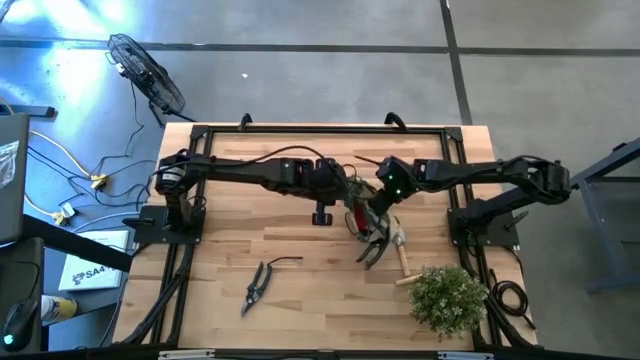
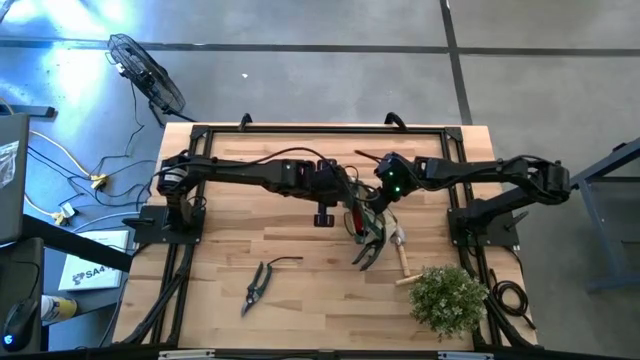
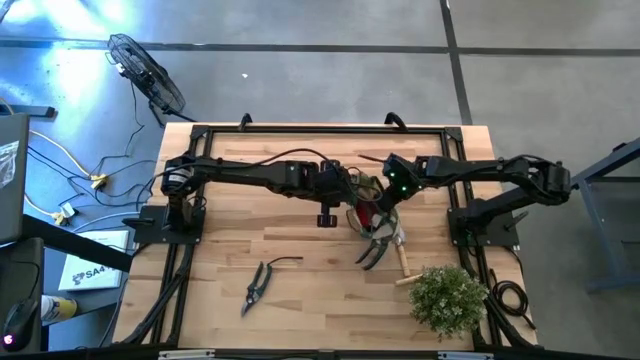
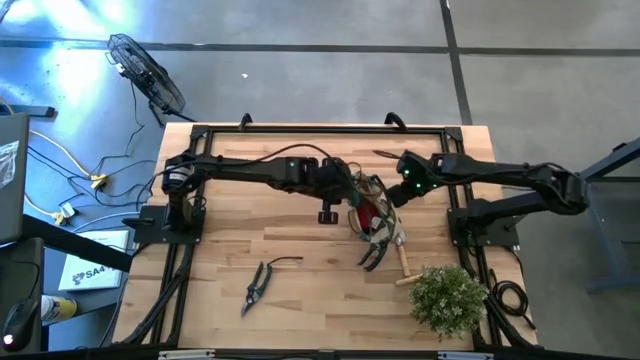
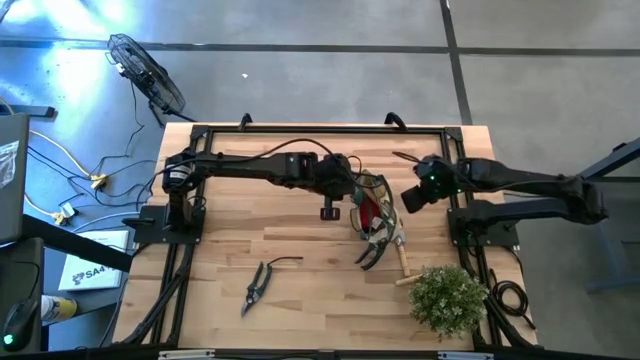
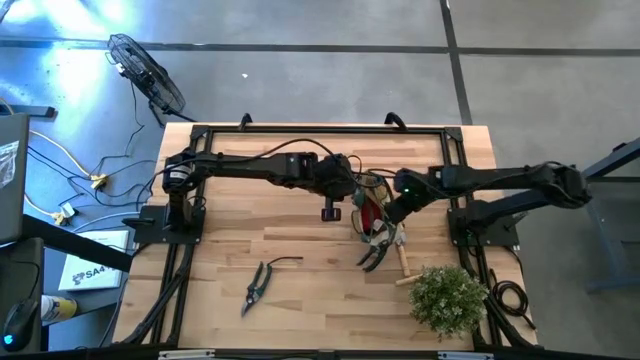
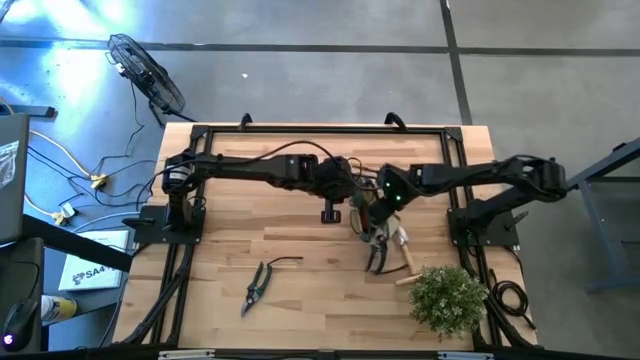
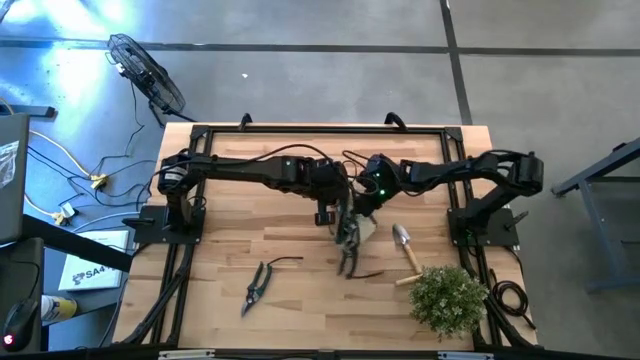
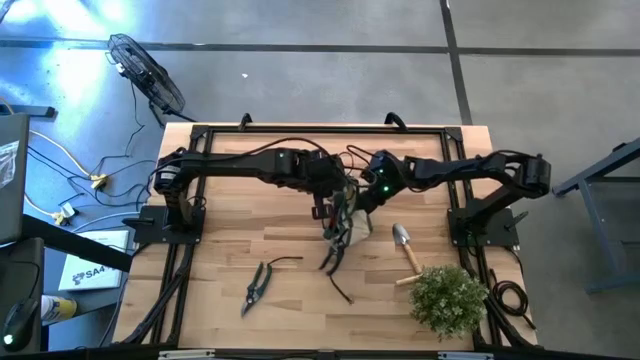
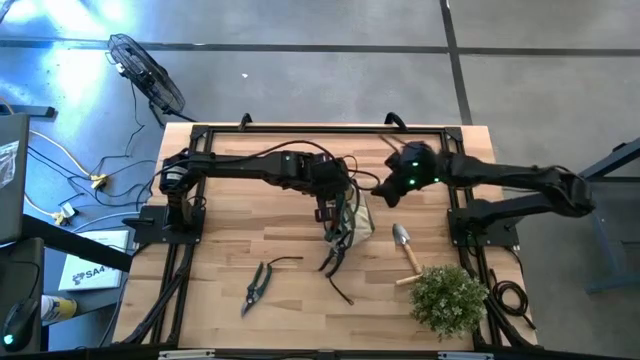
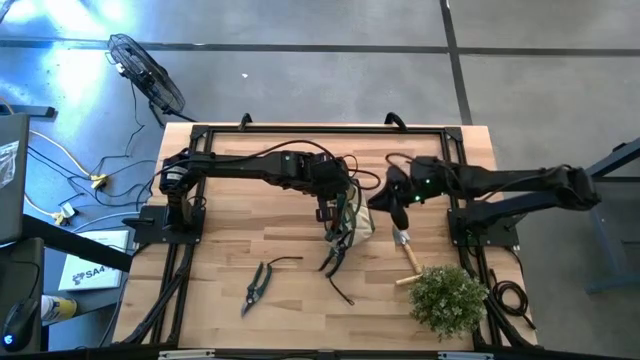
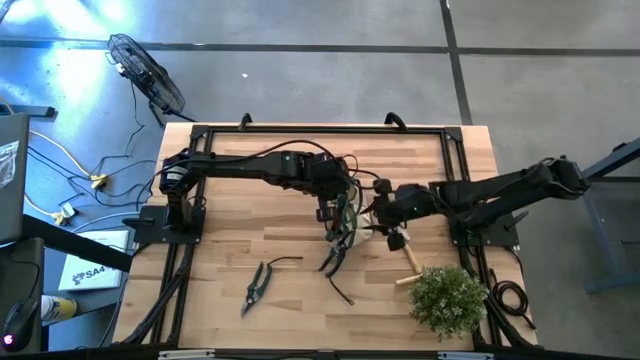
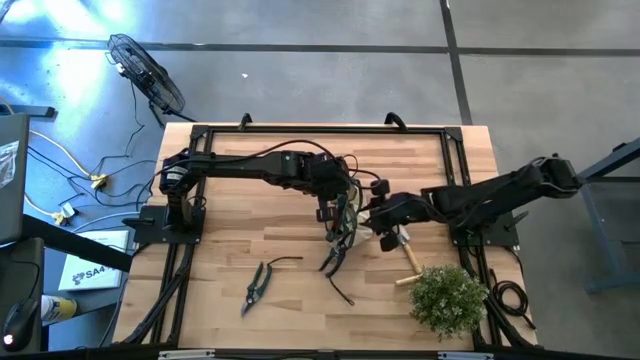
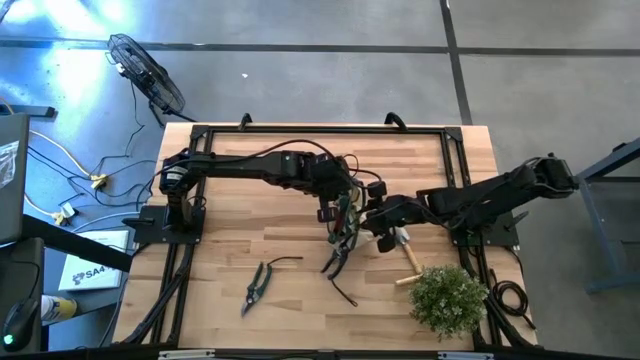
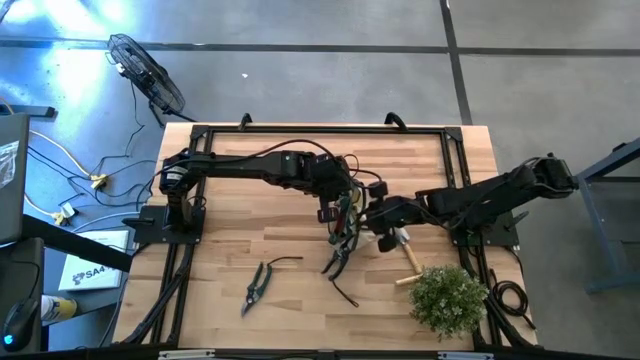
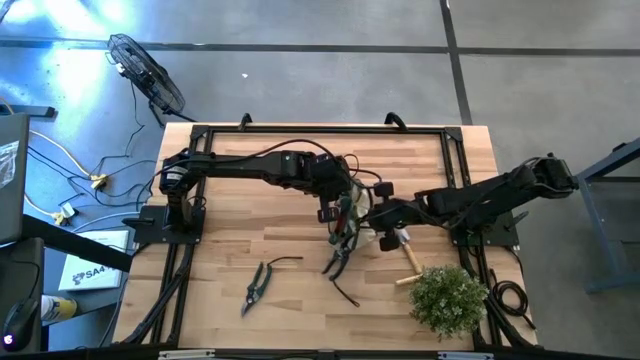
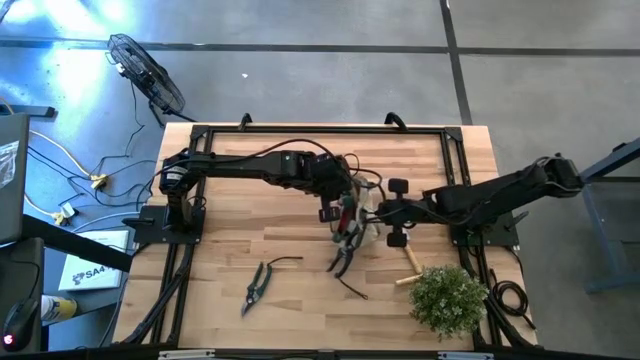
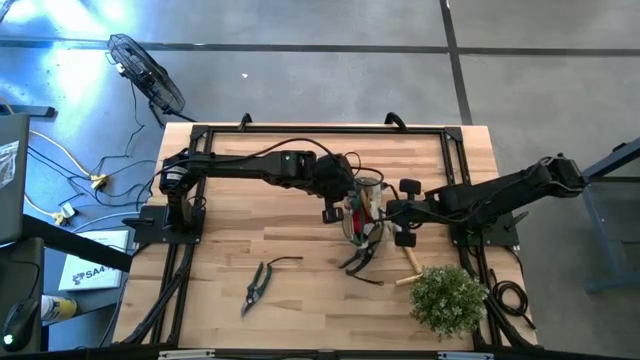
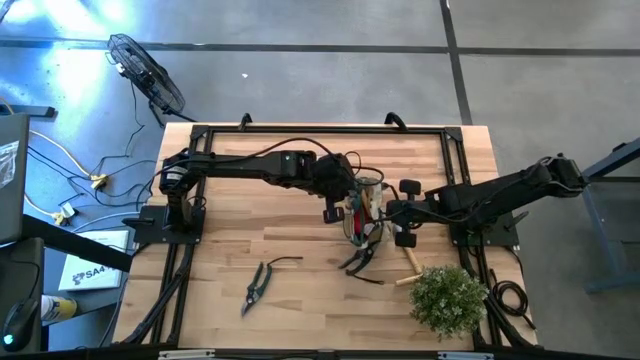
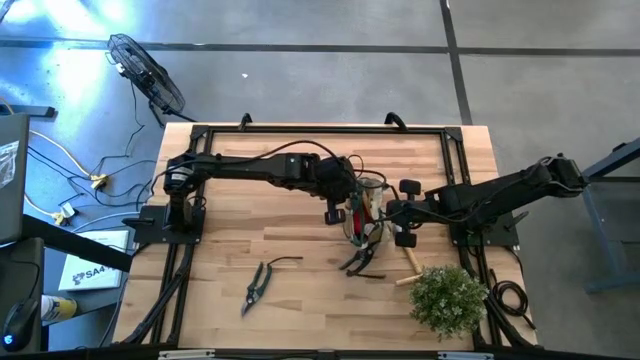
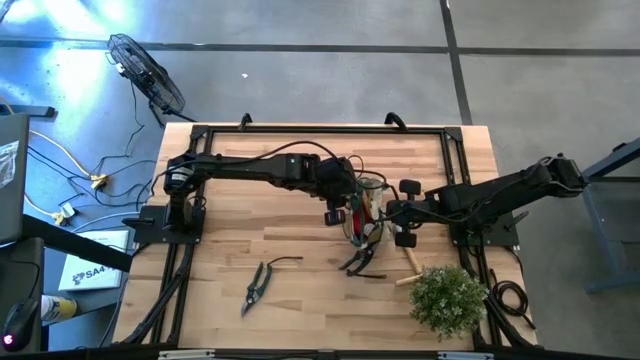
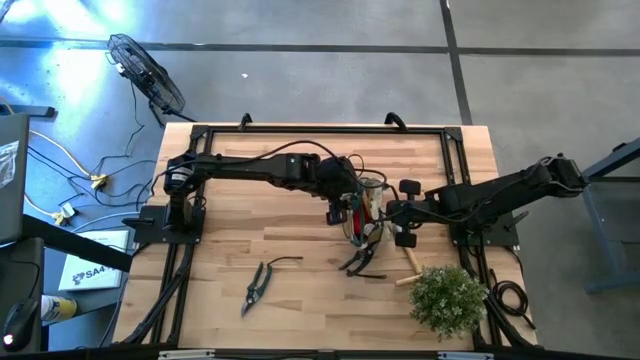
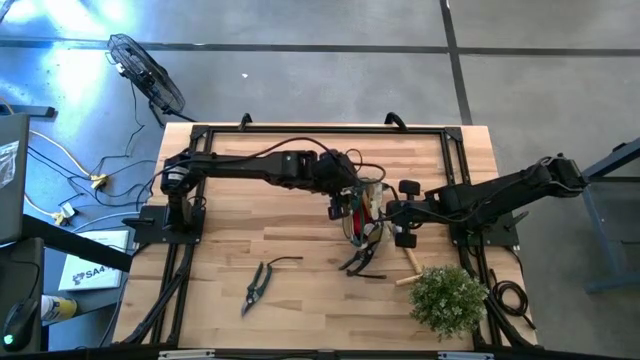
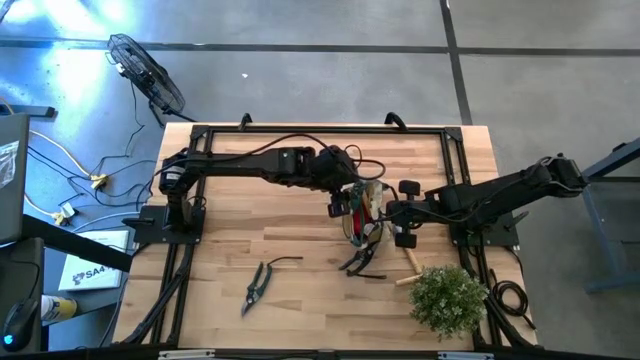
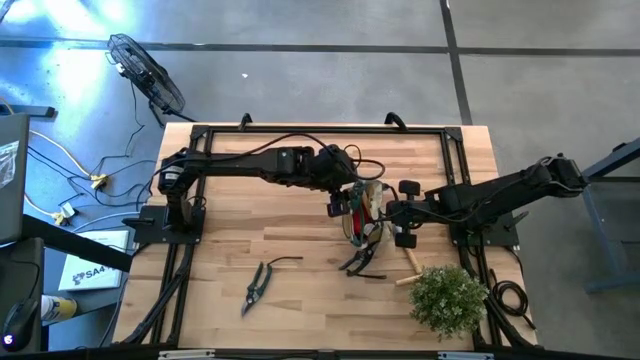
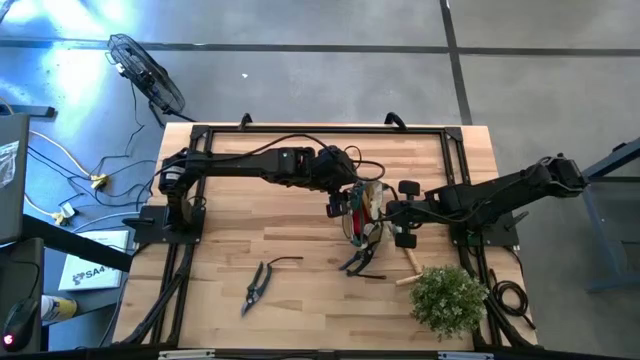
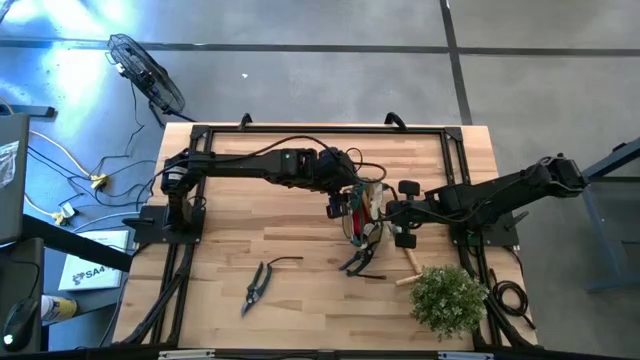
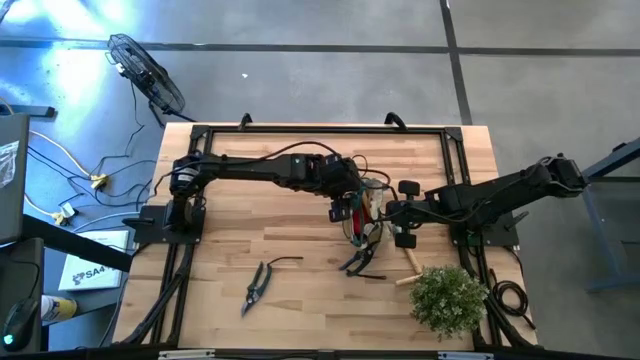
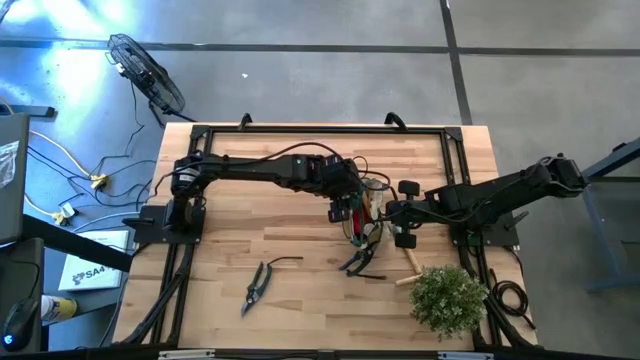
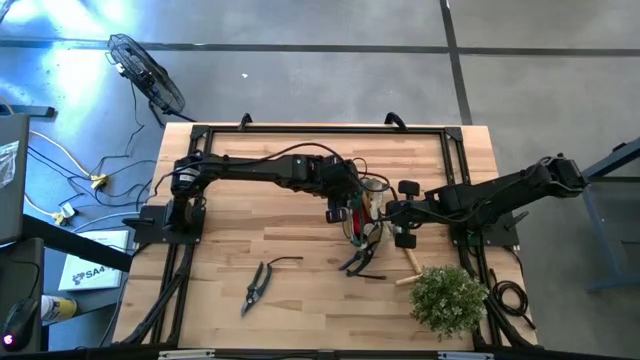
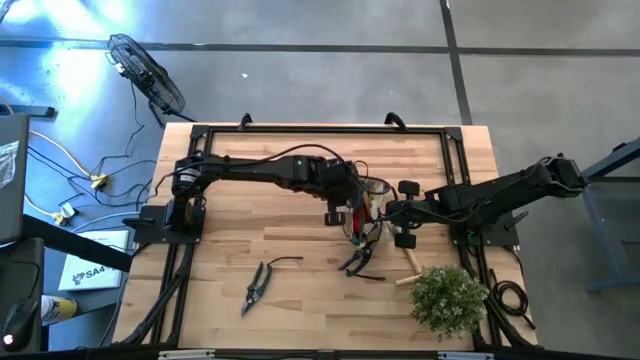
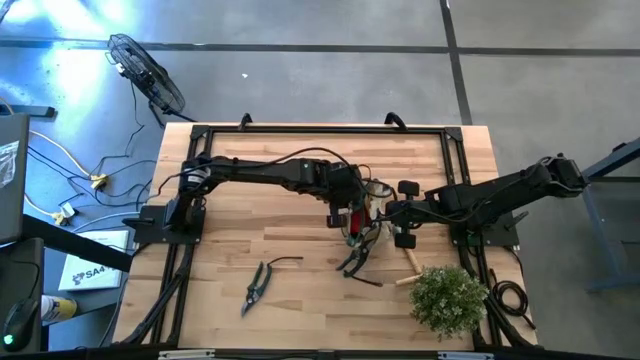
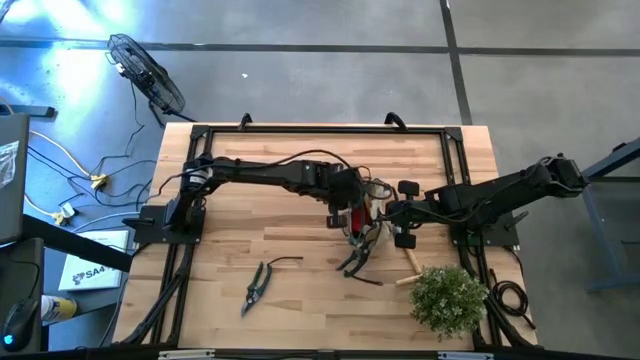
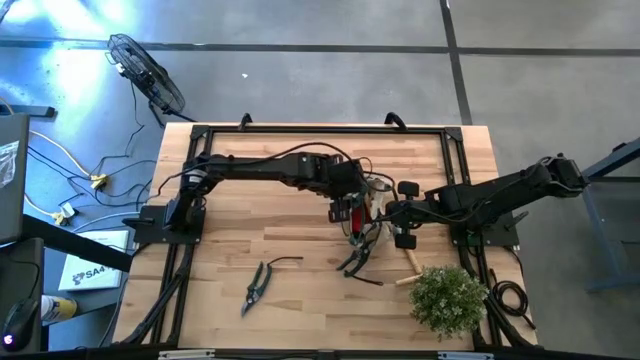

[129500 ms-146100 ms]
Task: Pick & Place Garden tools in Gardening bag
Put the bottom left brown trowel into the light brown gardening bag

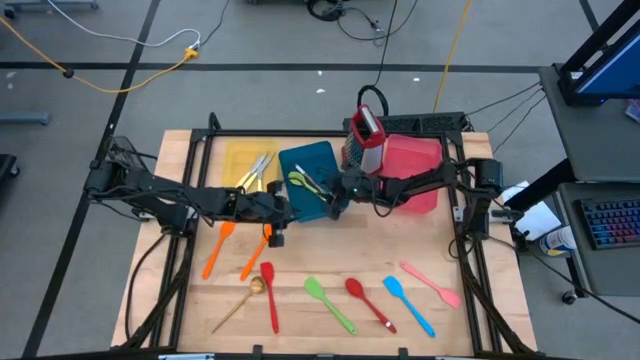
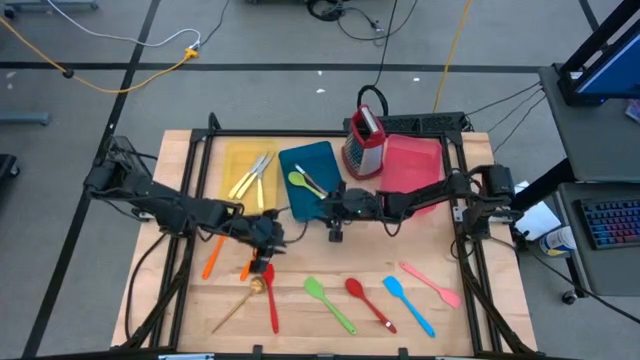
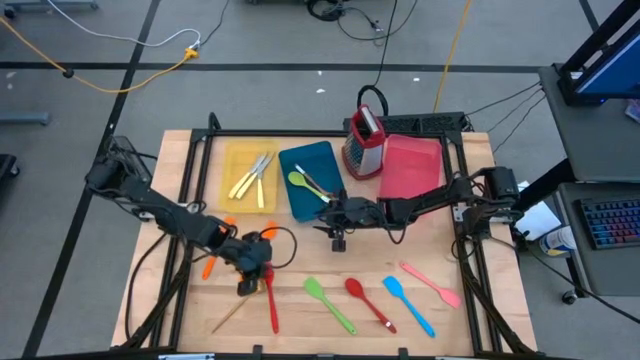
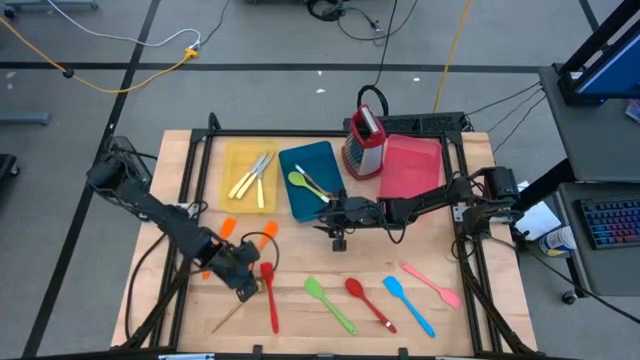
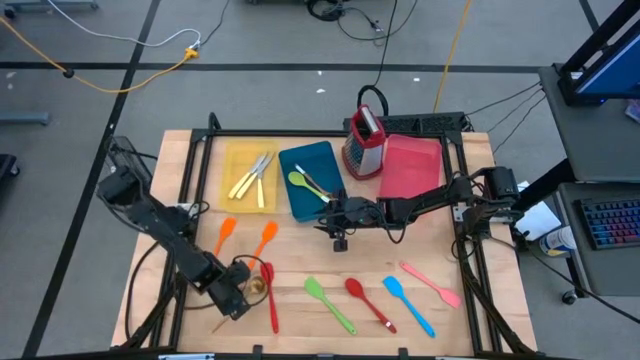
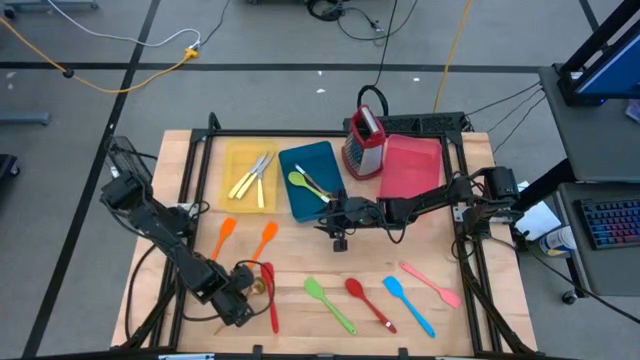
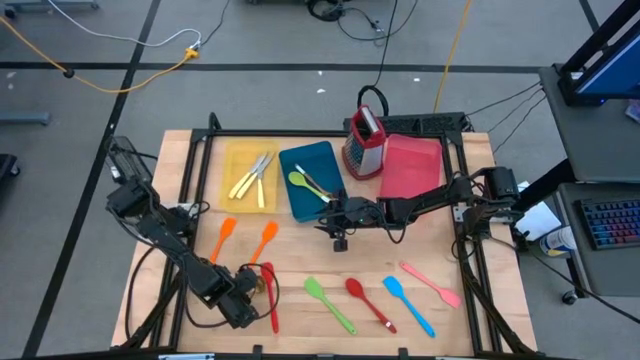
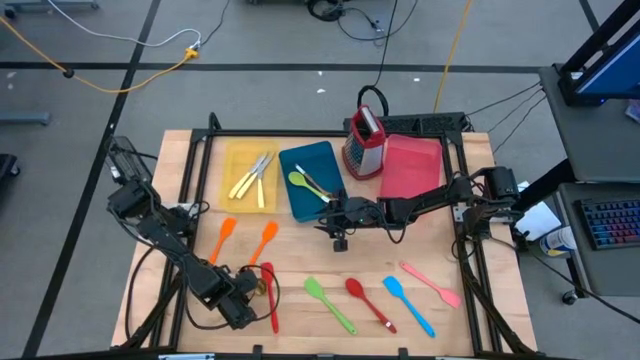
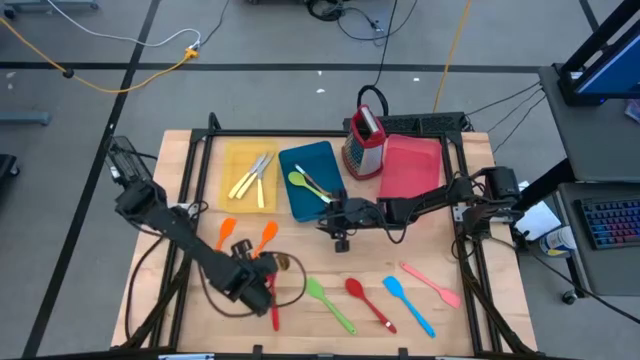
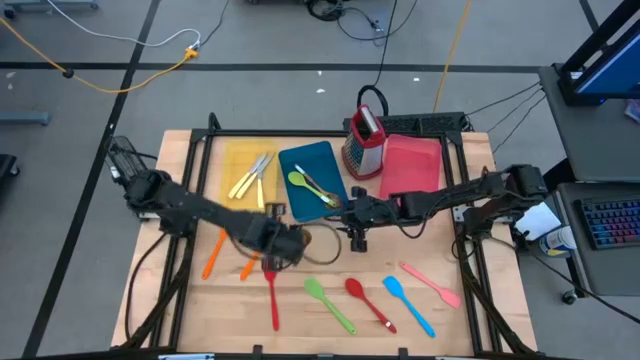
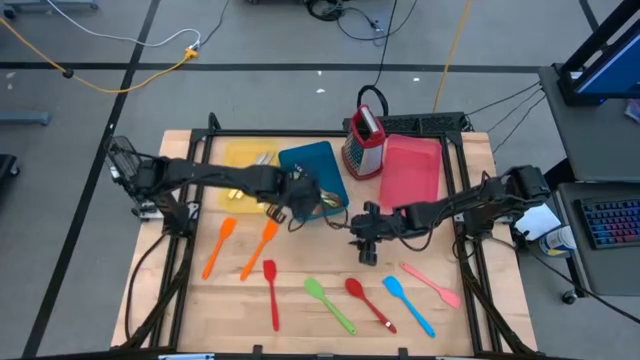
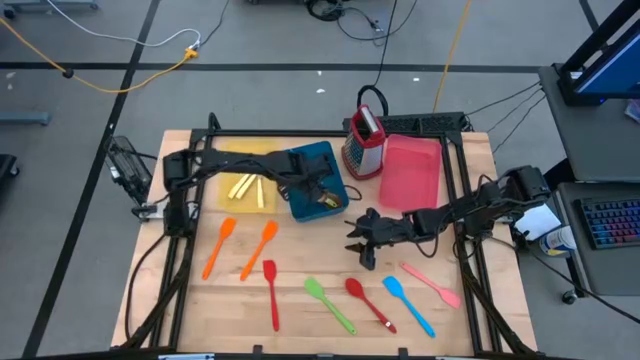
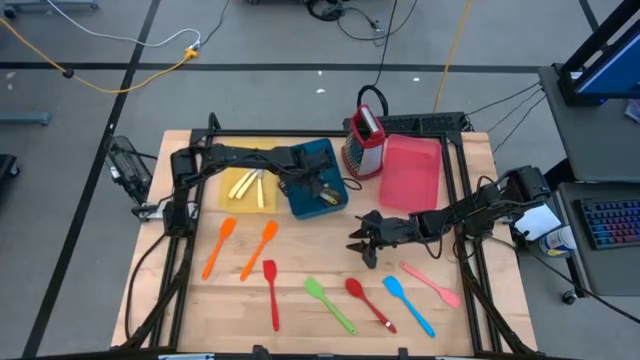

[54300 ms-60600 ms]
Task: Pick & Place Kitchen Items
Put the gold serving spoon into the blue bin
